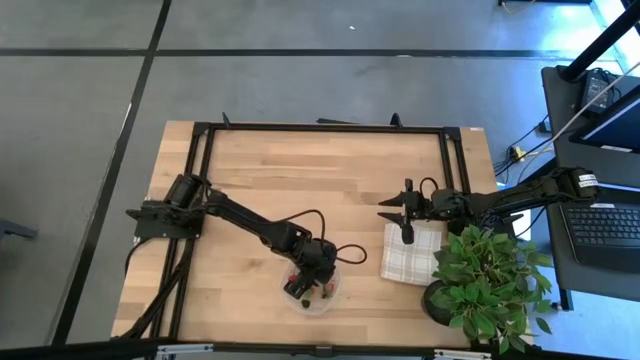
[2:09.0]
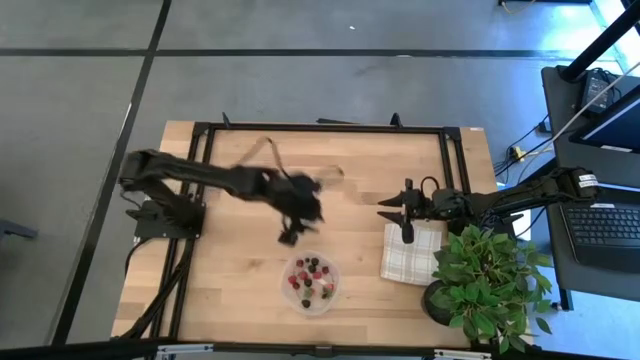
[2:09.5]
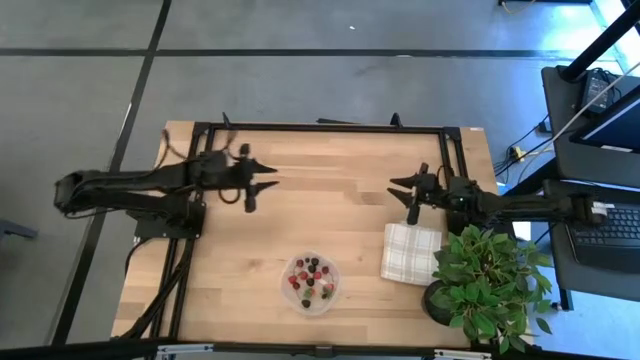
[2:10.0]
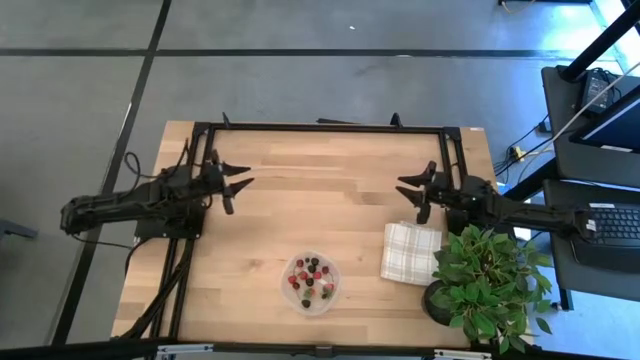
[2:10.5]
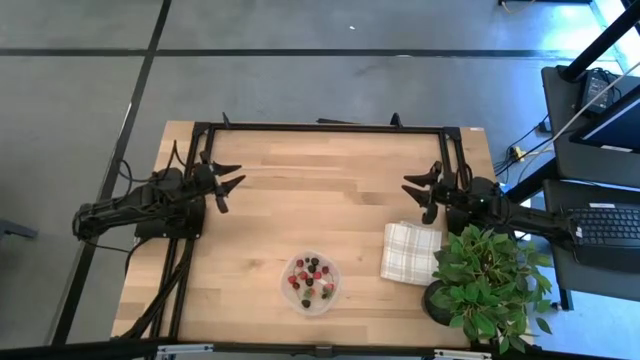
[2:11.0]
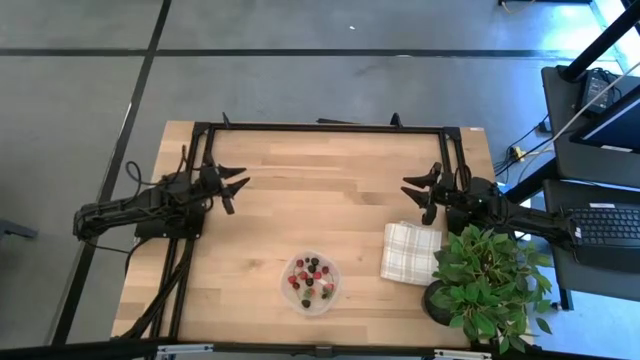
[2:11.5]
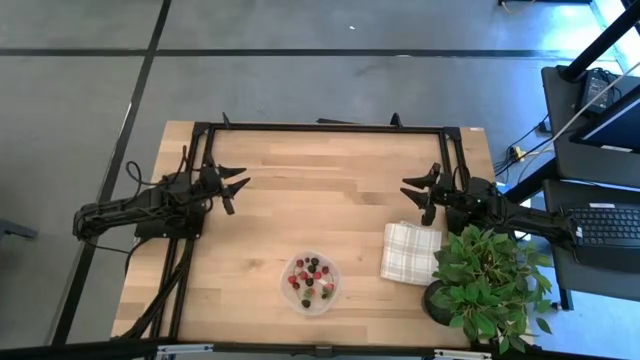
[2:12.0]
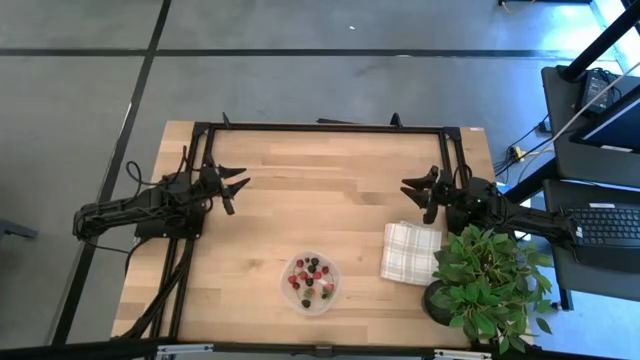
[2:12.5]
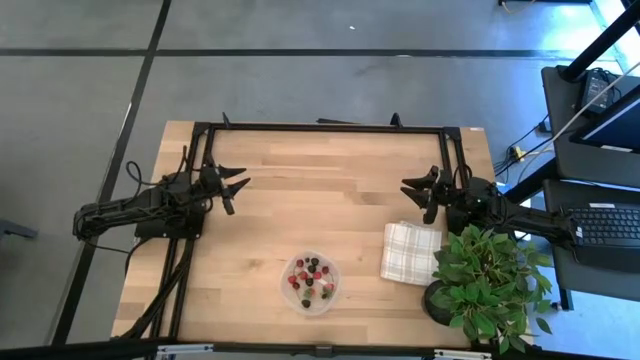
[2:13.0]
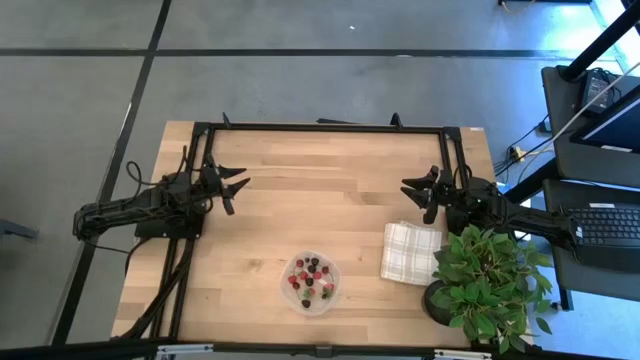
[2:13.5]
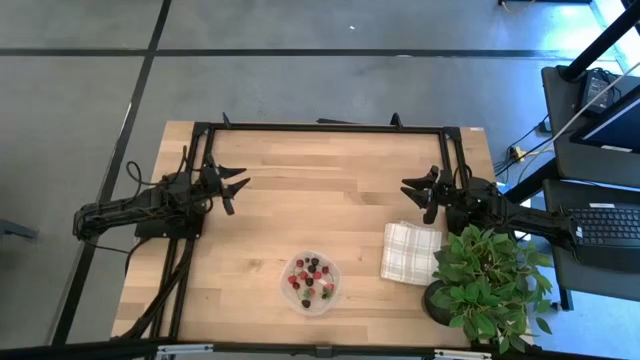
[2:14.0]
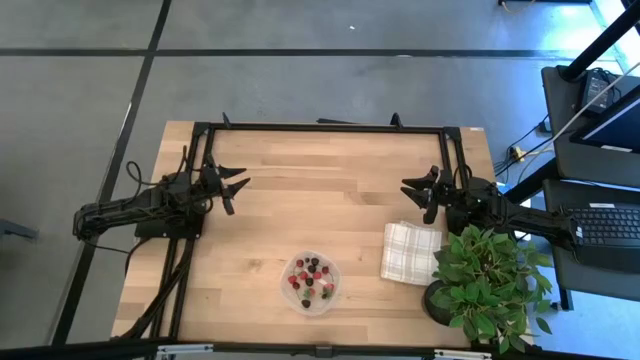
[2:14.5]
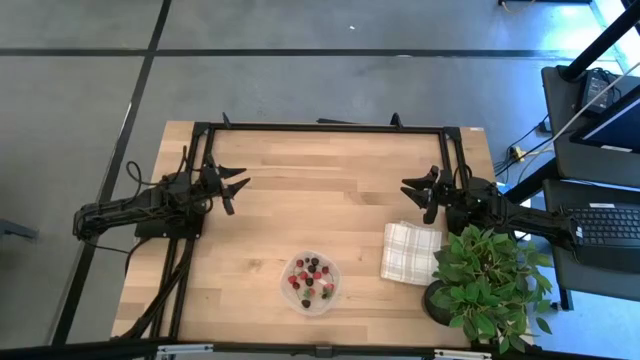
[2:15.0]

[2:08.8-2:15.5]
Task: Pick and placing Produce into tupperware
Return to Home Position

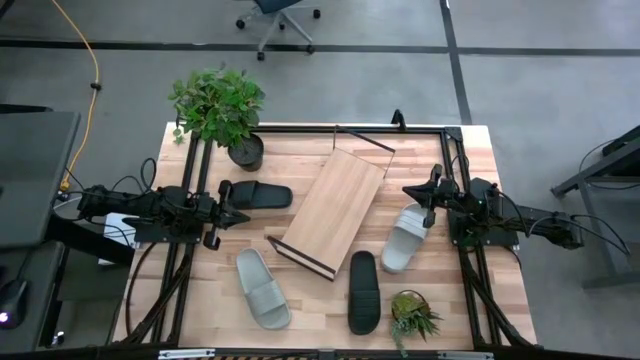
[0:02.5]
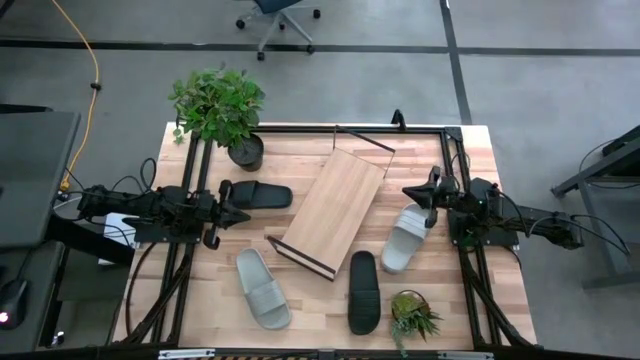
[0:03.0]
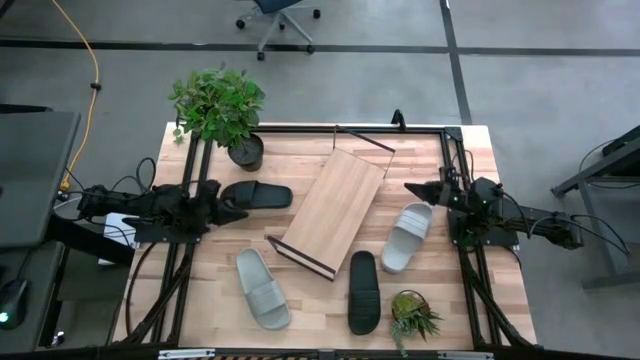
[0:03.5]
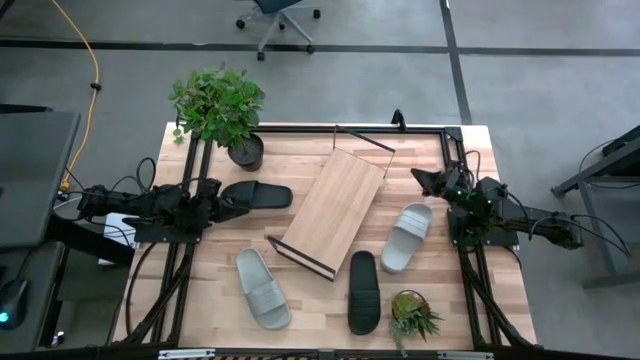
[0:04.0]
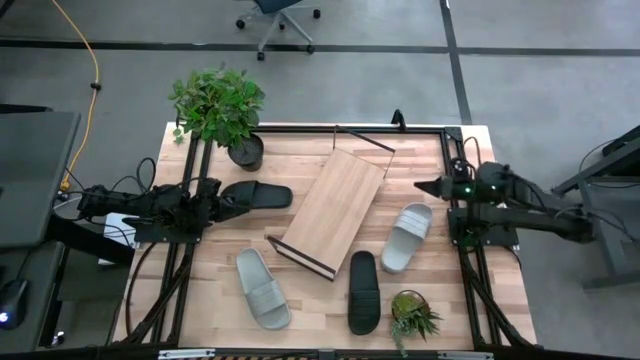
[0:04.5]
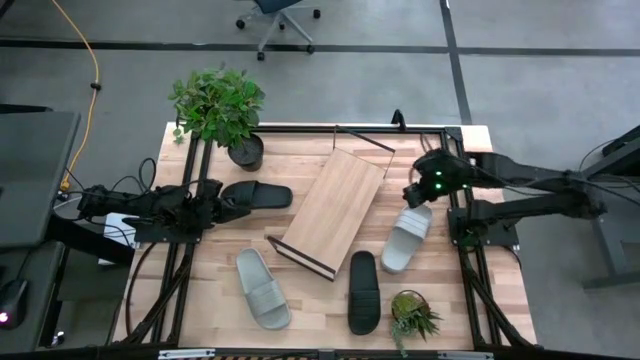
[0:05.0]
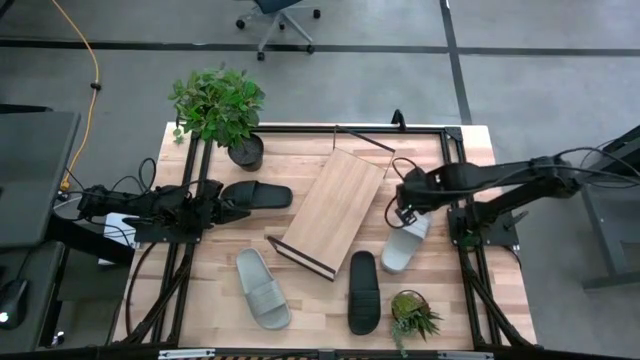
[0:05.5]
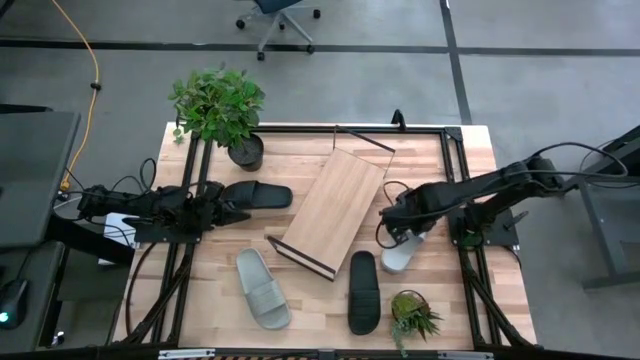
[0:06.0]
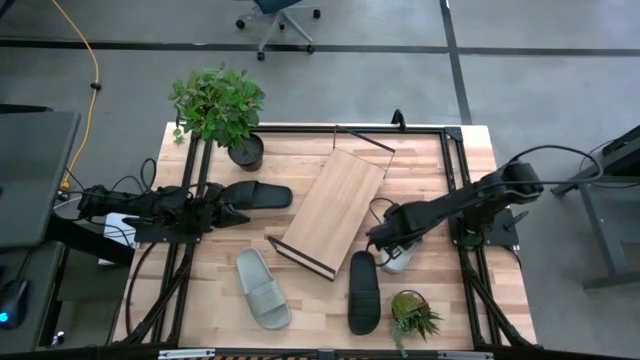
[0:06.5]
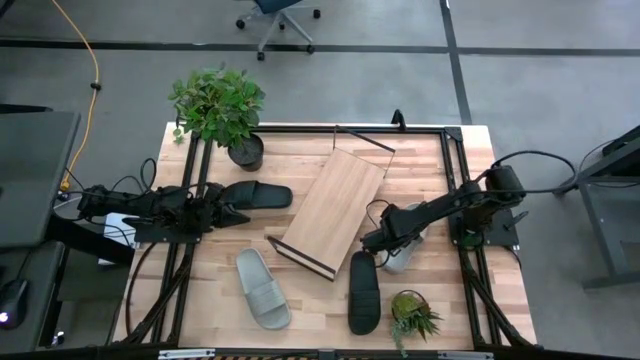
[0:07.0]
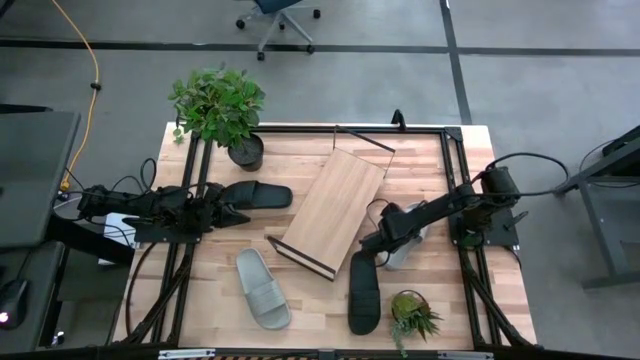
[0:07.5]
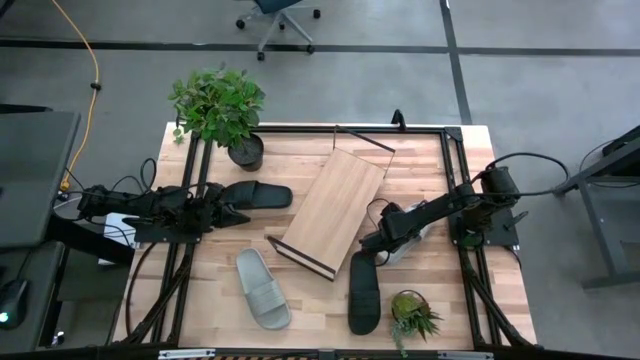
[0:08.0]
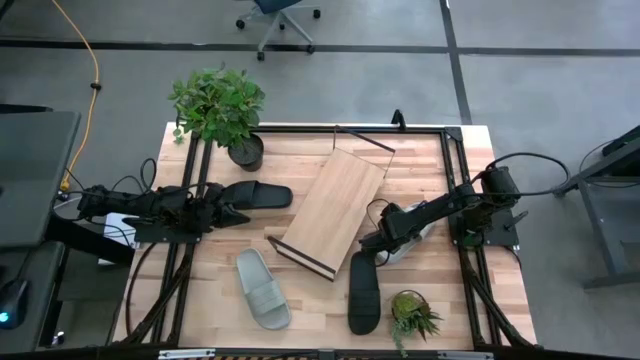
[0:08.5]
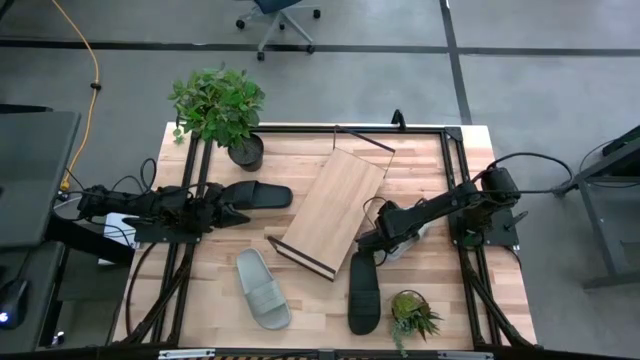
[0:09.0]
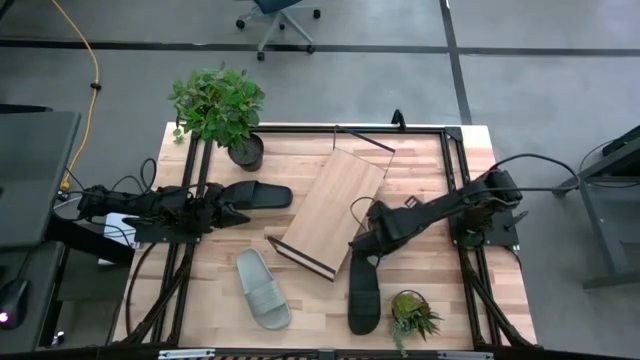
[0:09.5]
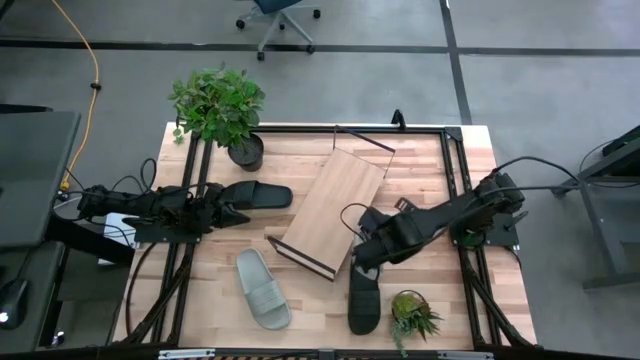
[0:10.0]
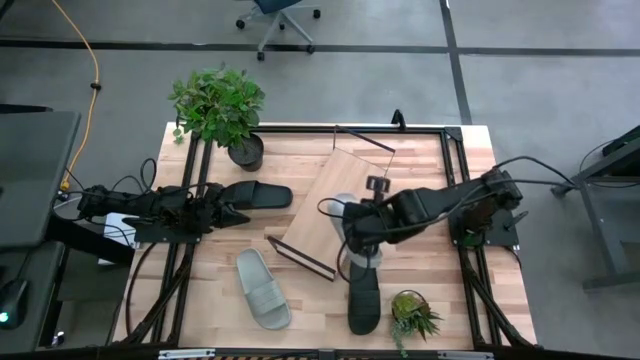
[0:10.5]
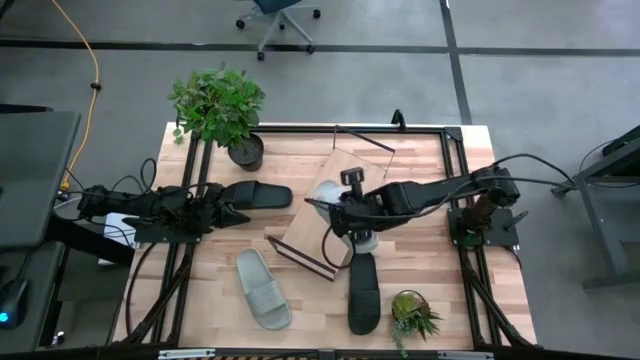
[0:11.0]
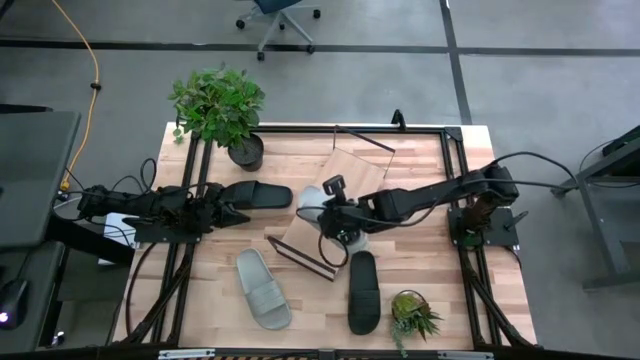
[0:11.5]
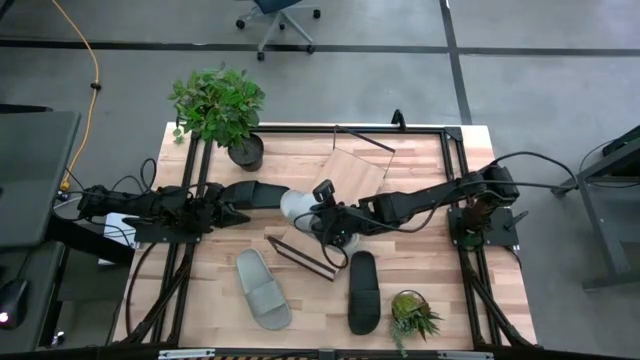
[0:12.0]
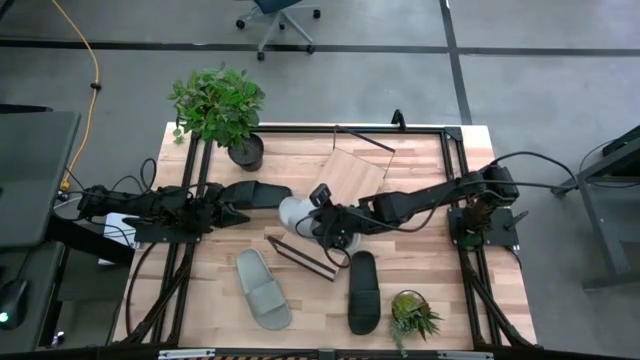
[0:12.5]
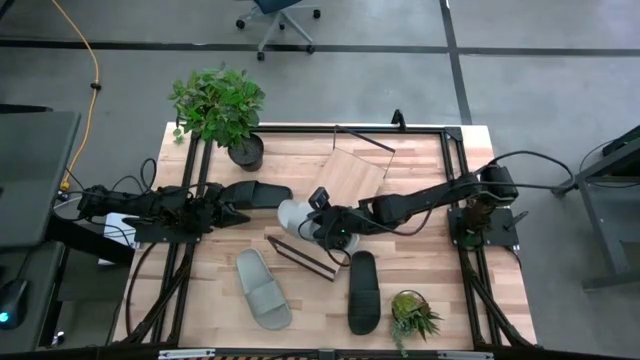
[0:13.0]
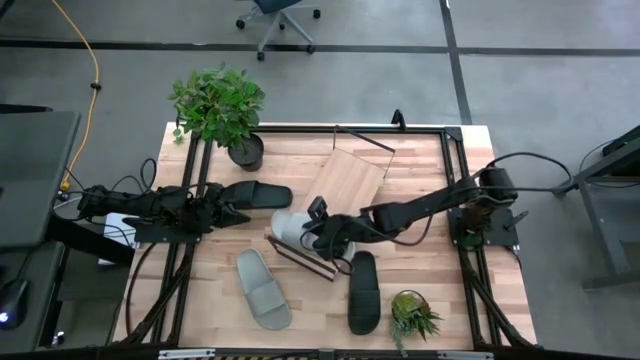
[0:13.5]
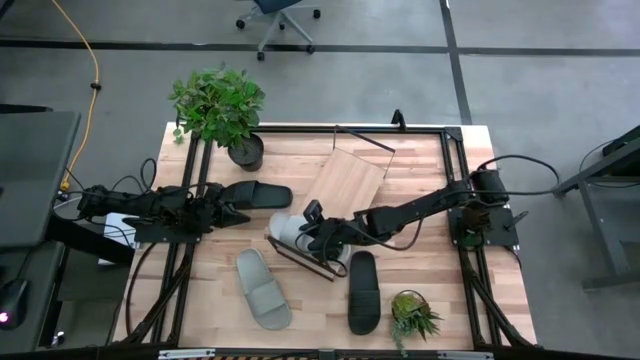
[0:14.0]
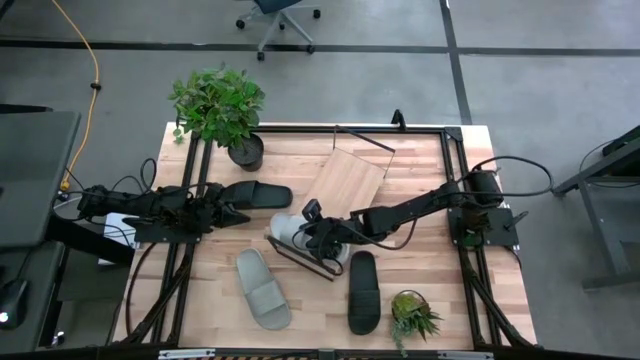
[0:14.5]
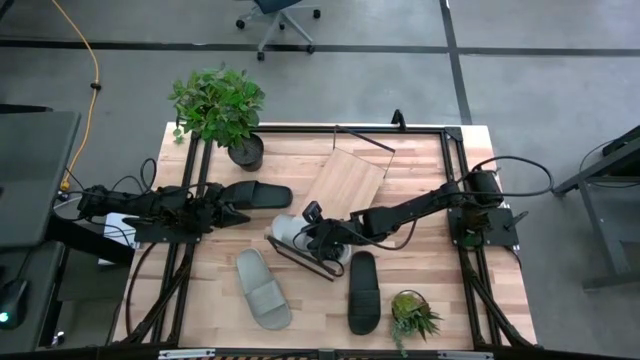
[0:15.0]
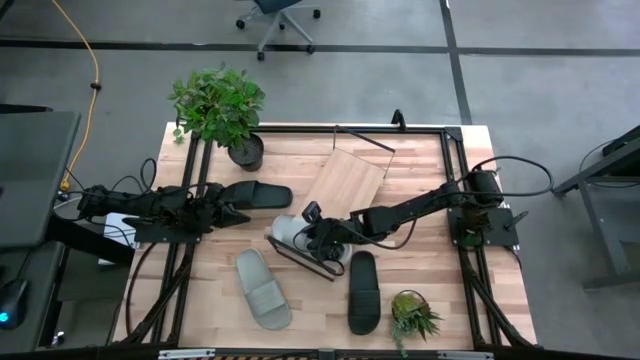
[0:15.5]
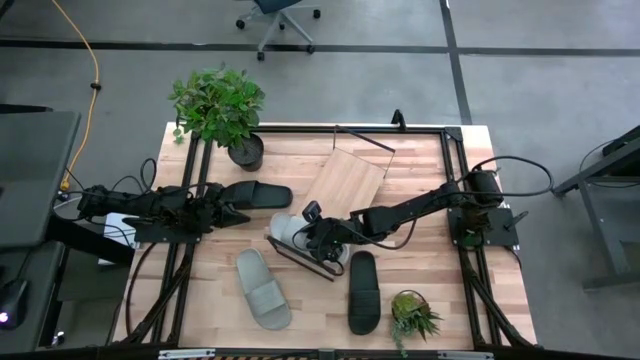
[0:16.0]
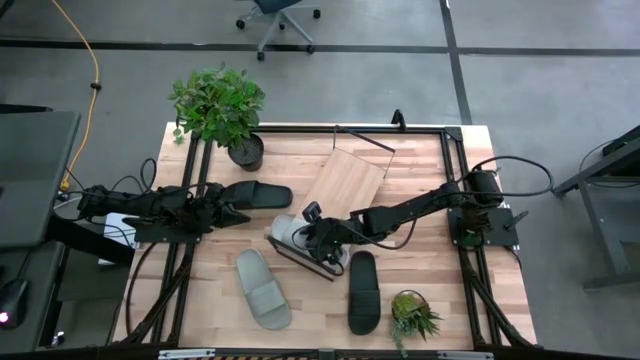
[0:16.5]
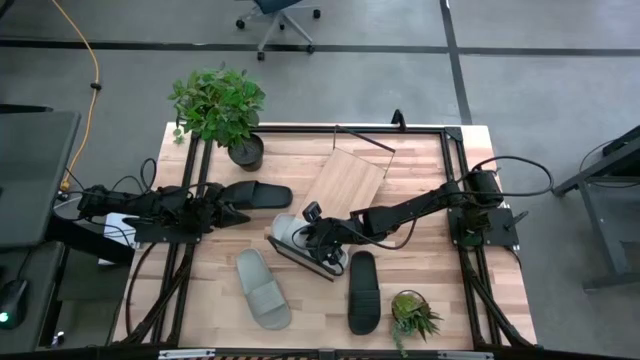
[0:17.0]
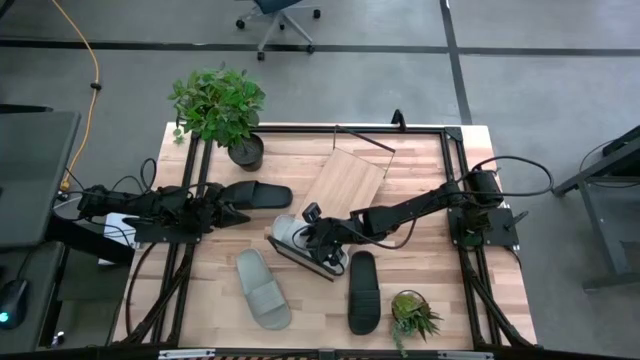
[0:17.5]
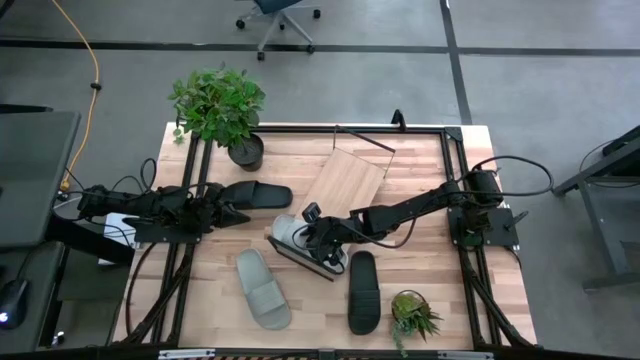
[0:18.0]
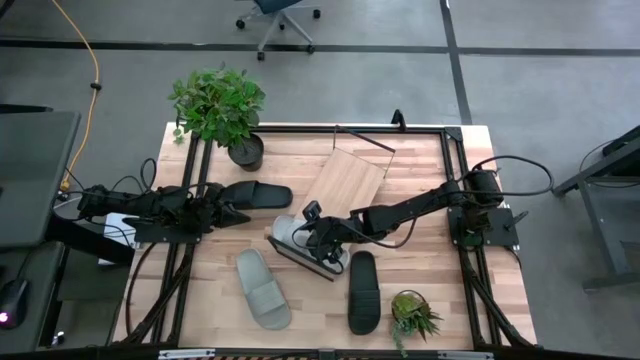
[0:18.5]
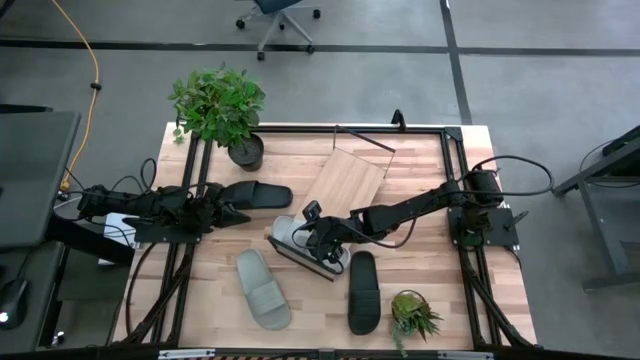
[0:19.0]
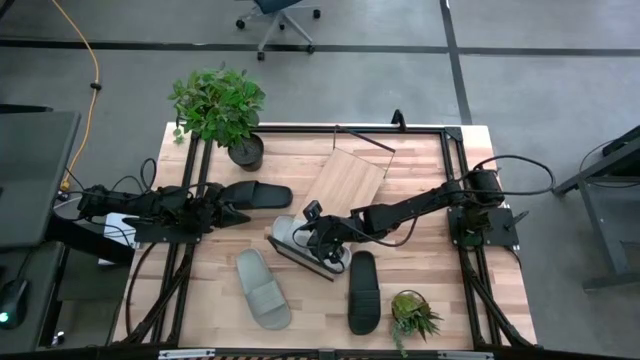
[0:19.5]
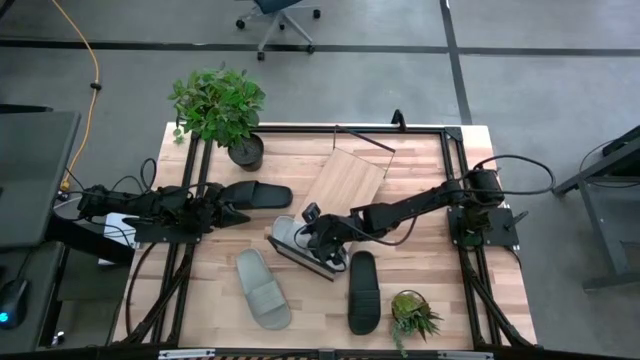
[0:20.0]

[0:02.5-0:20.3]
Task: Pick and place slides into the shelf
Put the top gray slide on the shelf
